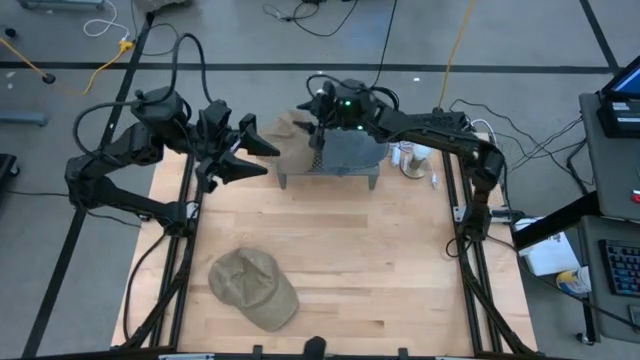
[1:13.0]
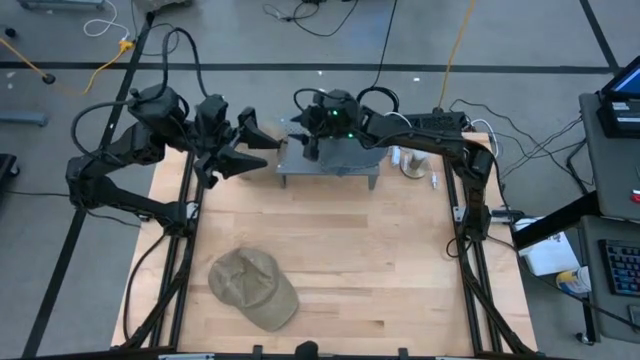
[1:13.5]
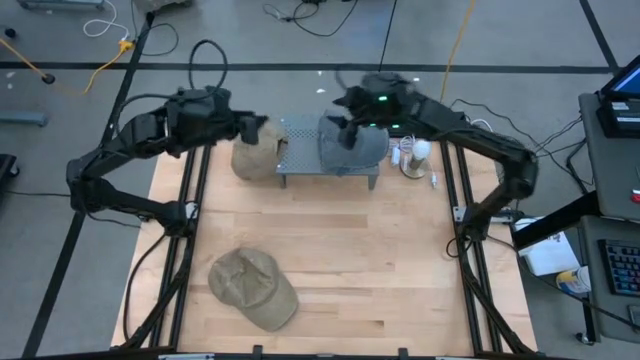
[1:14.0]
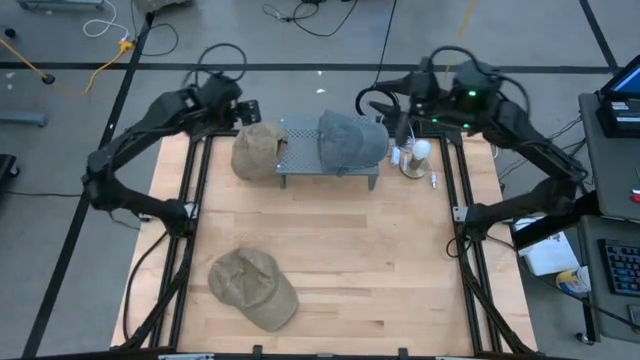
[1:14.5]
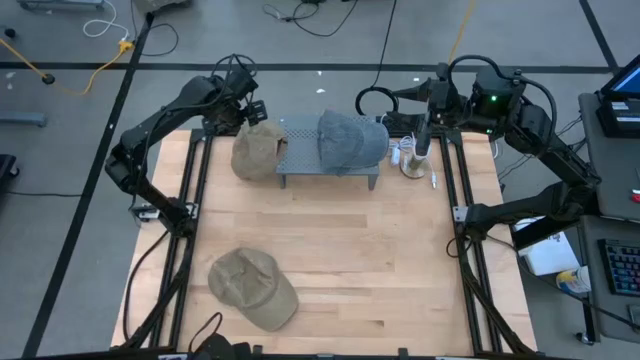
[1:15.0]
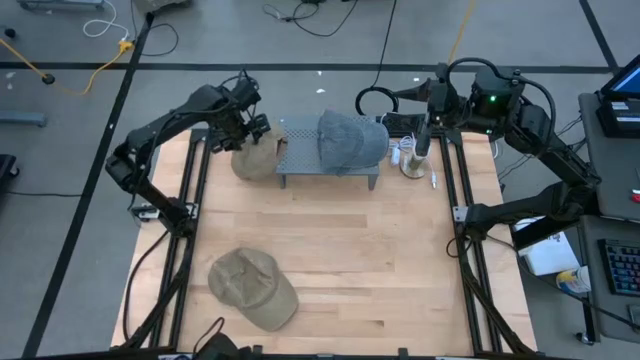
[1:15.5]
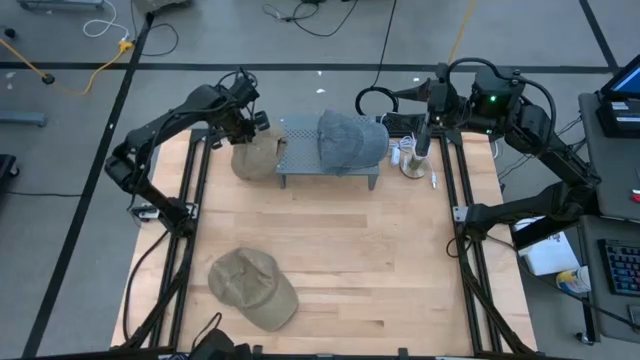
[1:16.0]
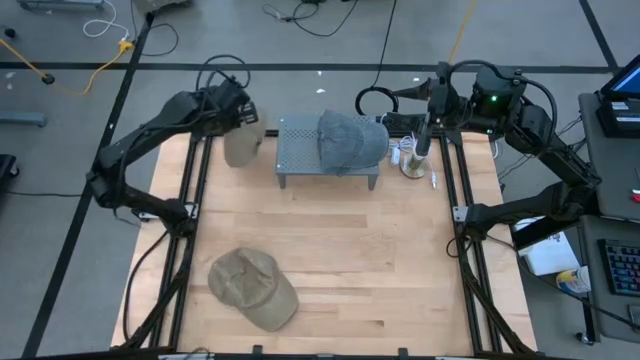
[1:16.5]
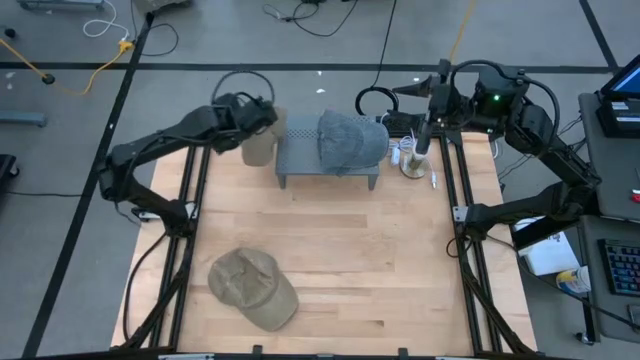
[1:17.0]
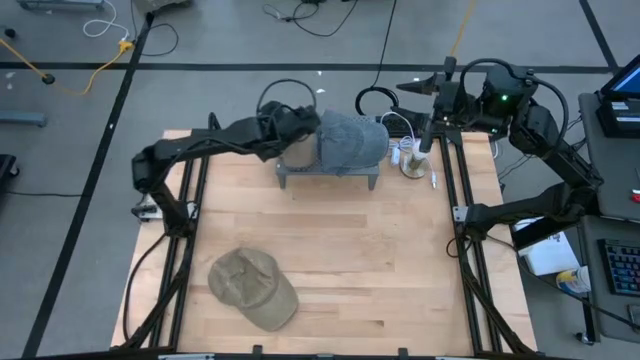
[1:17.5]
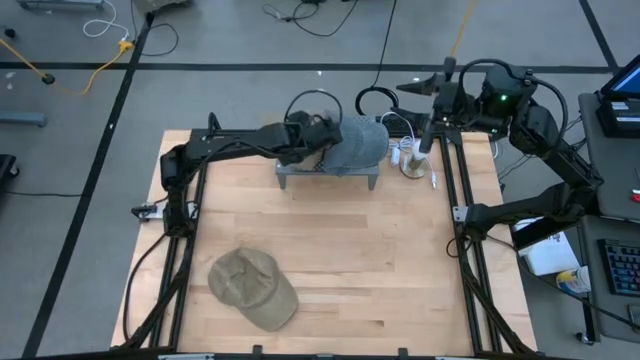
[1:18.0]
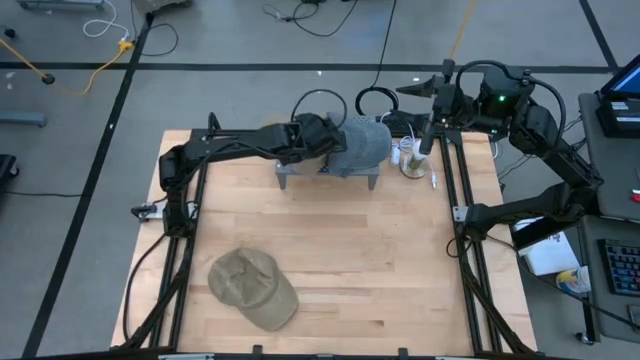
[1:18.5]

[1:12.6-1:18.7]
Task: Pick & Place hat
Put the top brown cap on the shelf

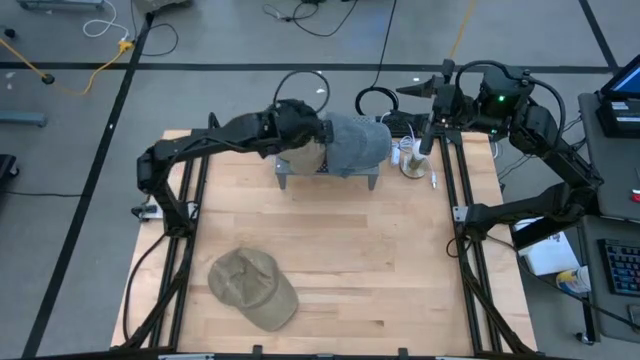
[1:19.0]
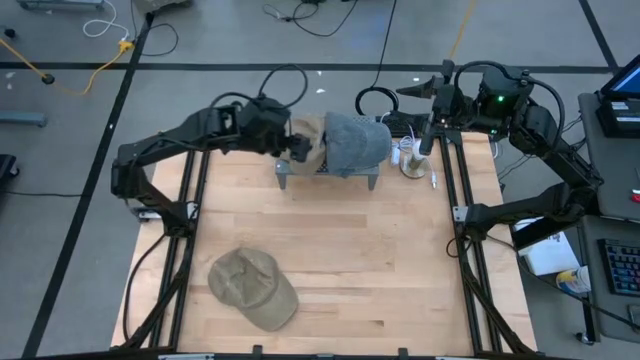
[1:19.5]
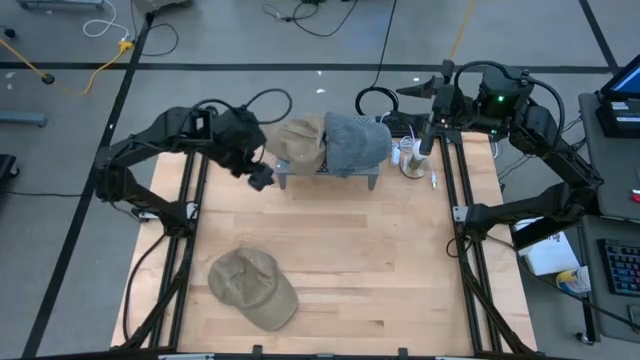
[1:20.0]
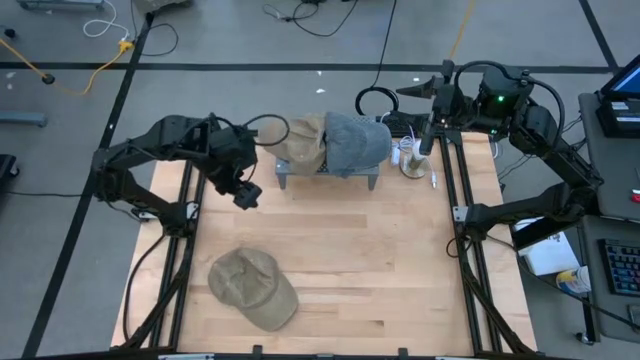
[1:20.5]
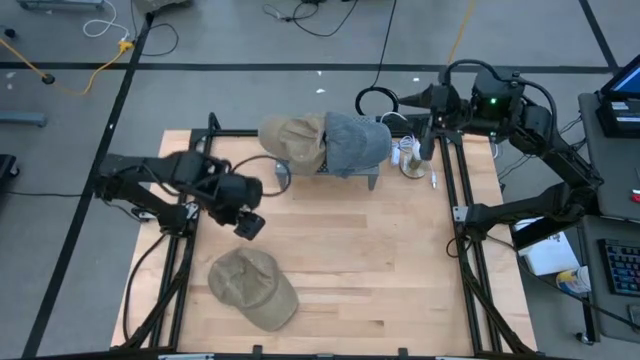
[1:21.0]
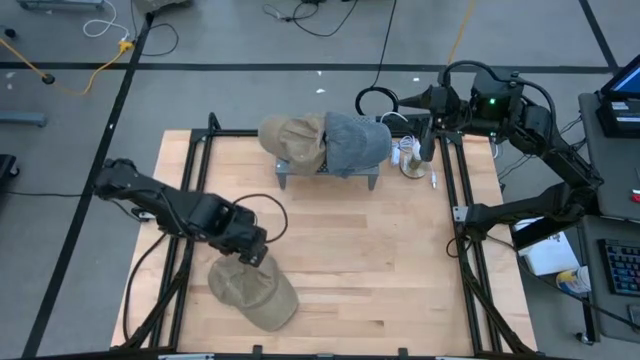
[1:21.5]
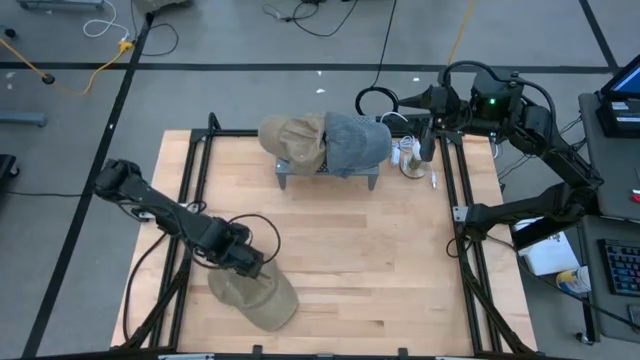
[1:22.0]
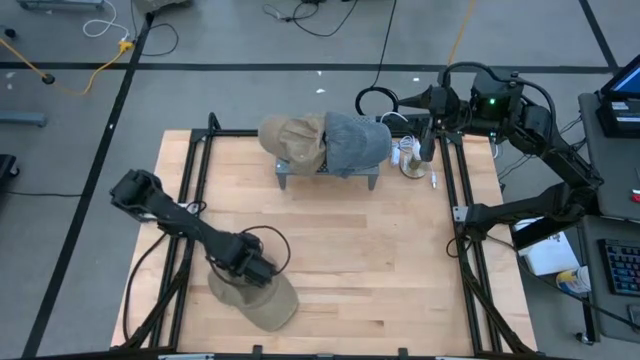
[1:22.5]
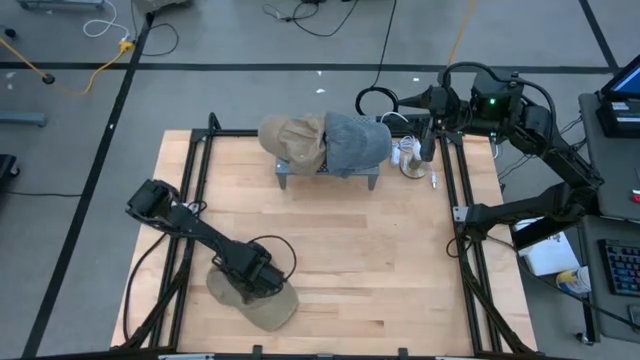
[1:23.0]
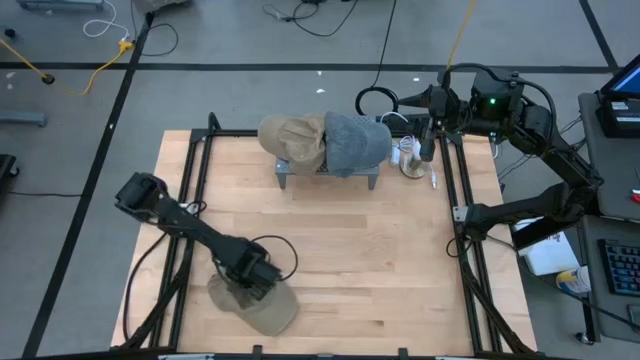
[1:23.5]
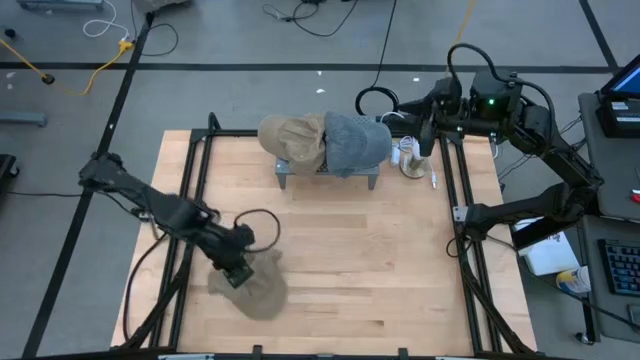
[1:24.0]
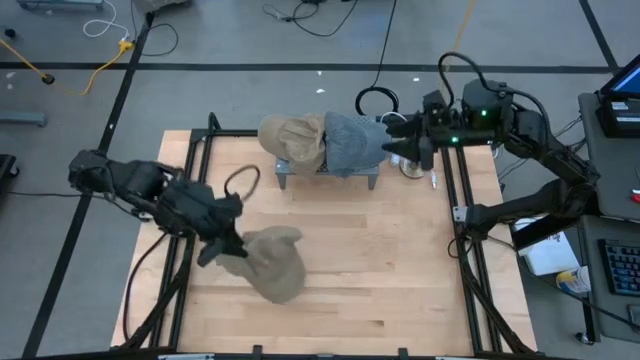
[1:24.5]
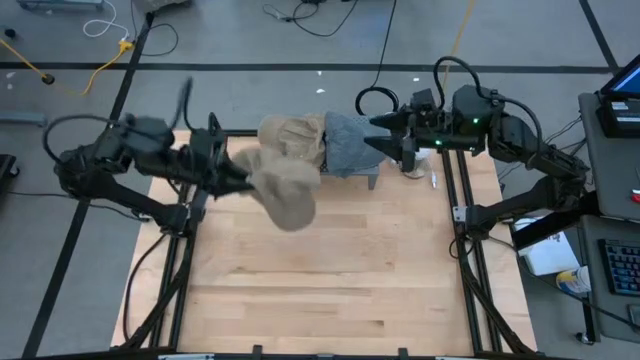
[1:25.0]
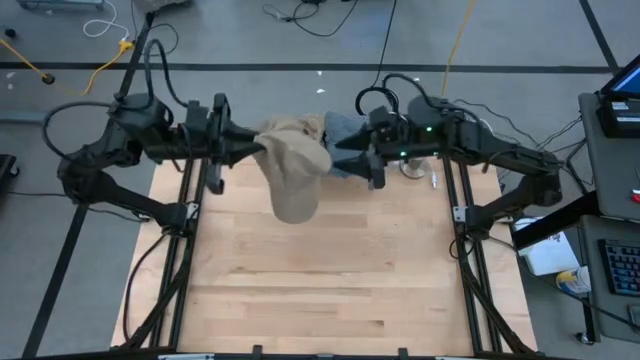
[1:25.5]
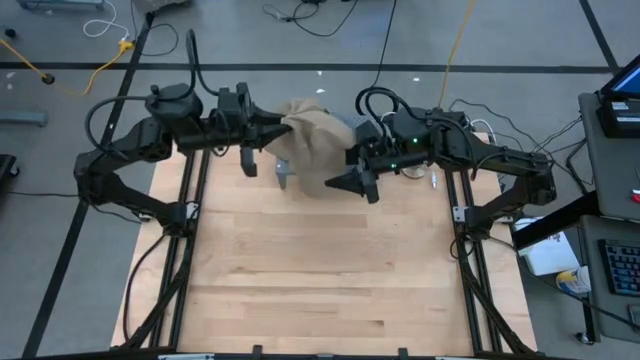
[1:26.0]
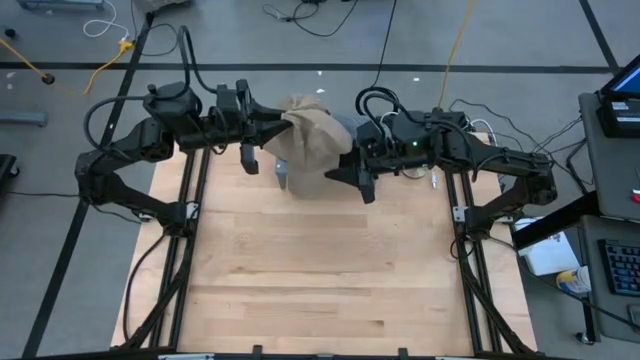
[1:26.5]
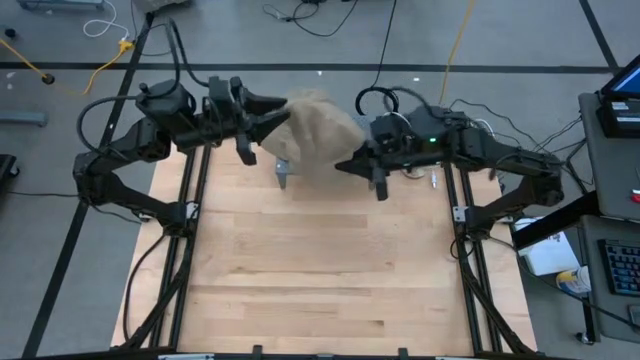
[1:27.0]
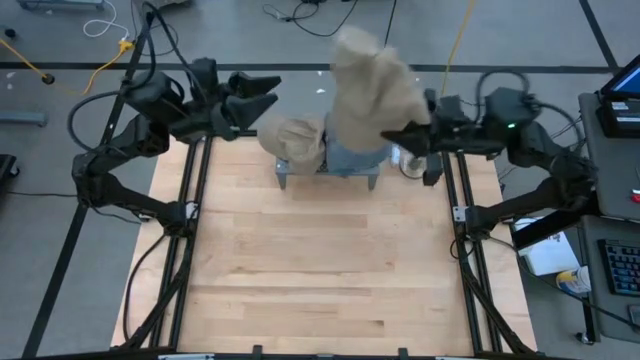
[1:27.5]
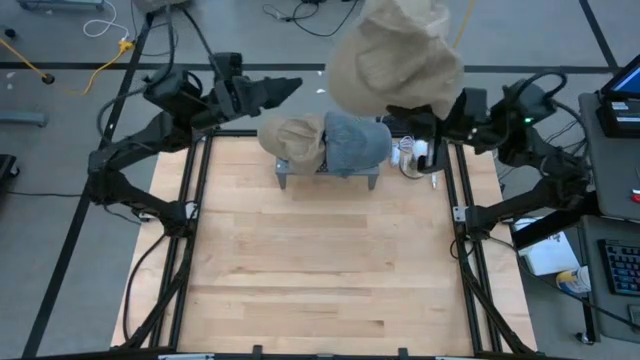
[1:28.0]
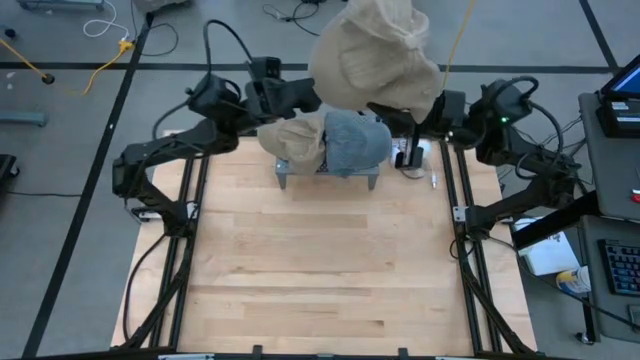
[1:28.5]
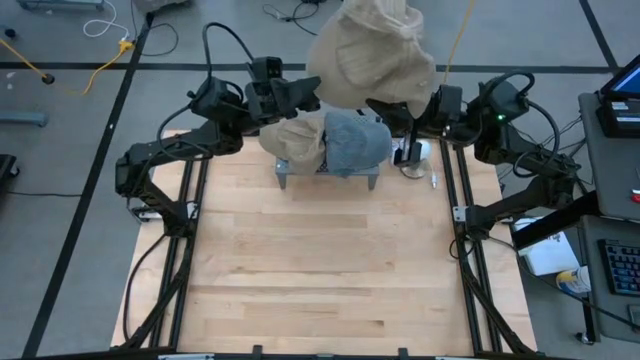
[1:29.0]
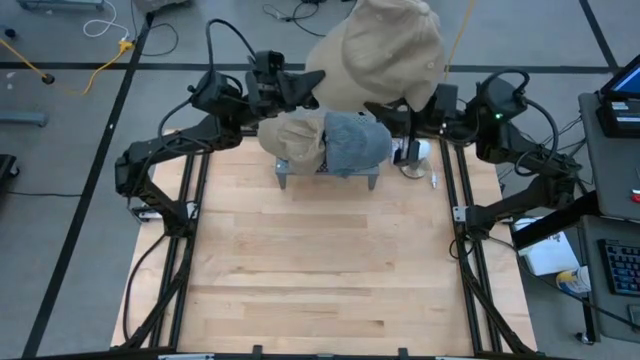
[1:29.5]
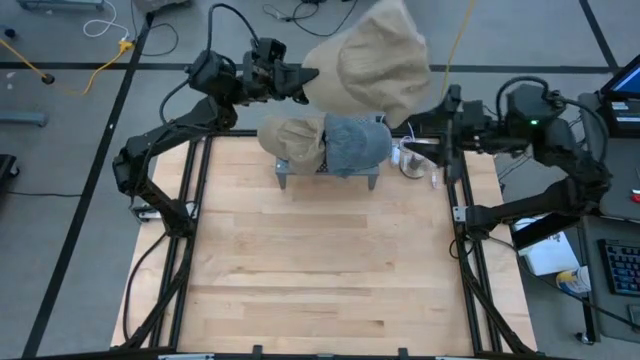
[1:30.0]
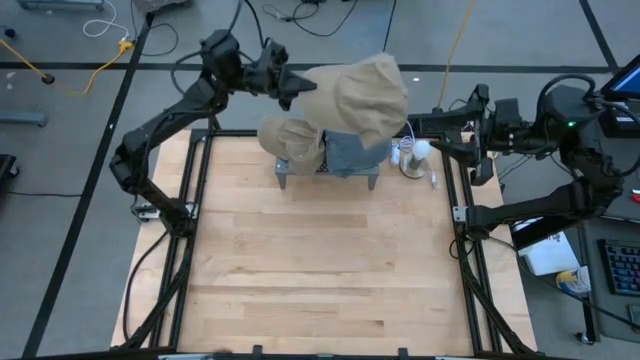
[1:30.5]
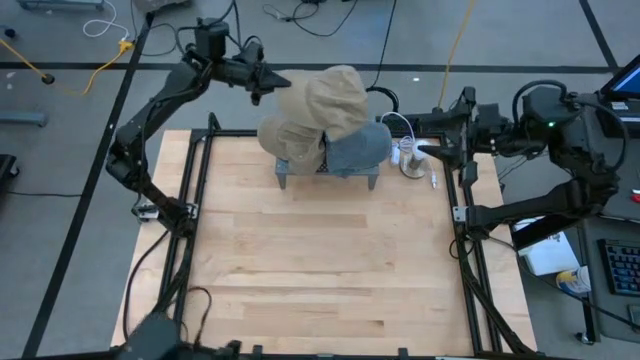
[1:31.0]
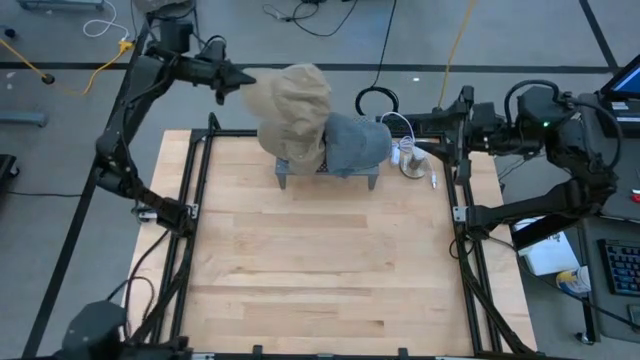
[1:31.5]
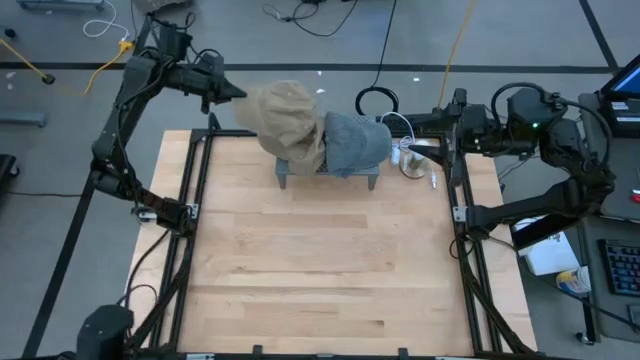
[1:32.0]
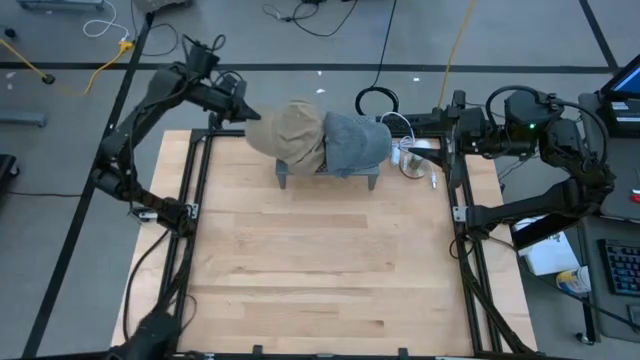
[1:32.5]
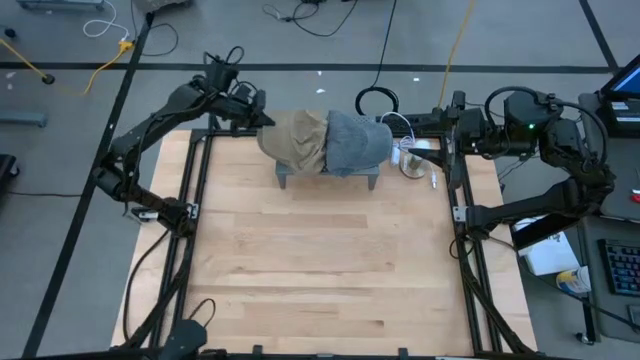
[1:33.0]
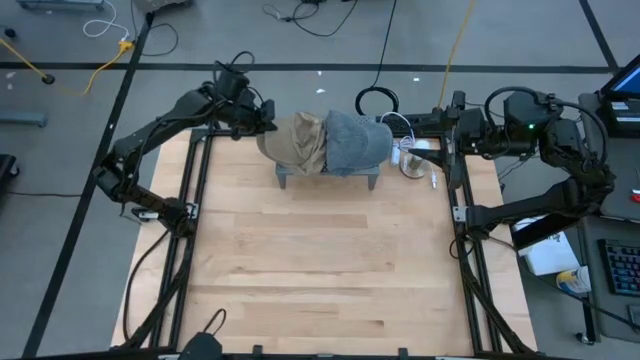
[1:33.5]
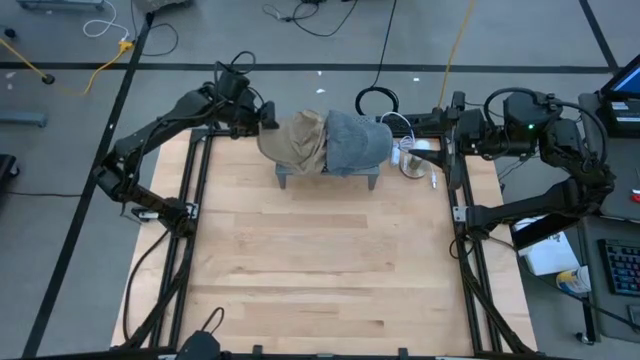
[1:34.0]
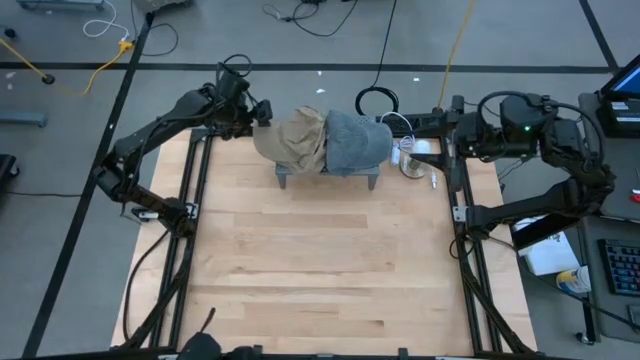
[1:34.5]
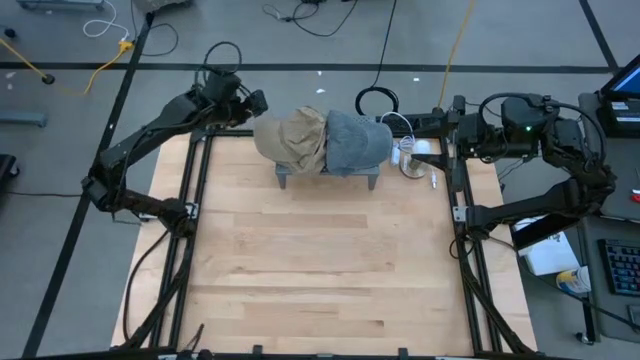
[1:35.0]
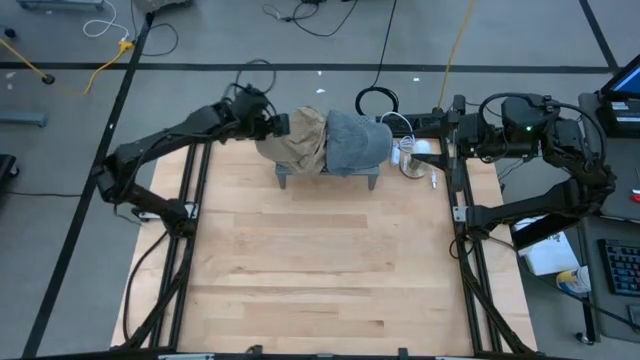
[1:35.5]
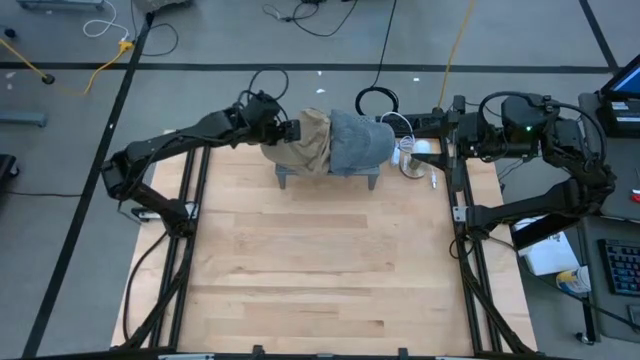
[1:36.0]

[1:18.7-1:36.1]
Stack the brown cap on top of the brown cap on the shelf
